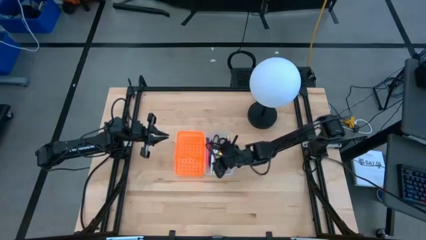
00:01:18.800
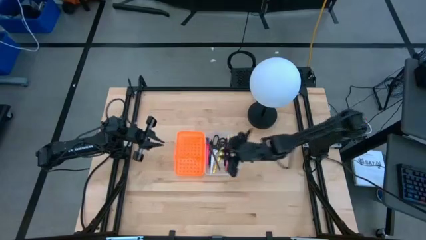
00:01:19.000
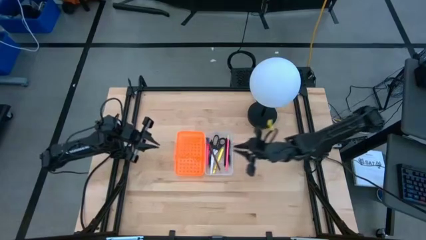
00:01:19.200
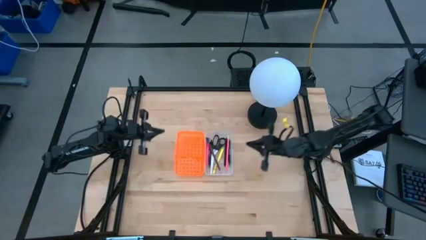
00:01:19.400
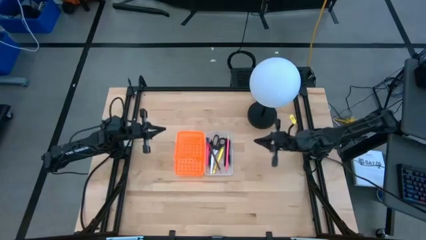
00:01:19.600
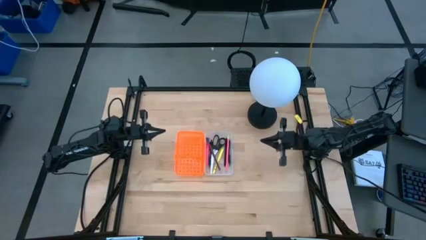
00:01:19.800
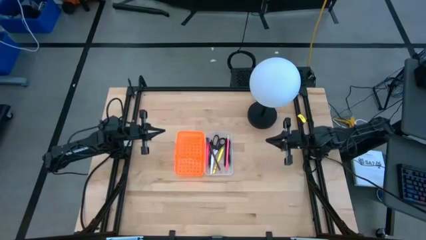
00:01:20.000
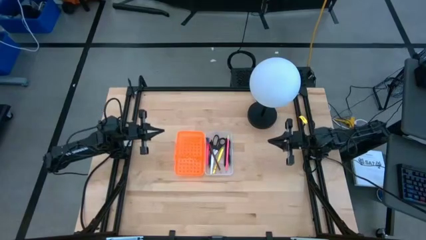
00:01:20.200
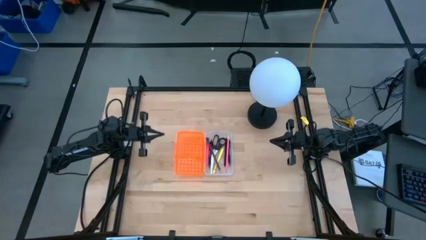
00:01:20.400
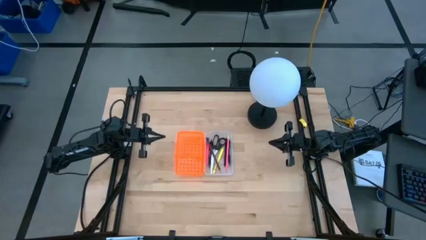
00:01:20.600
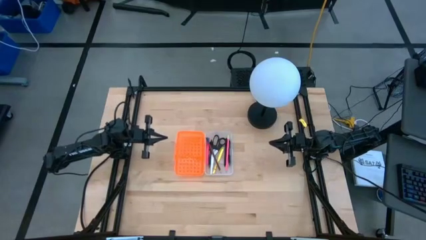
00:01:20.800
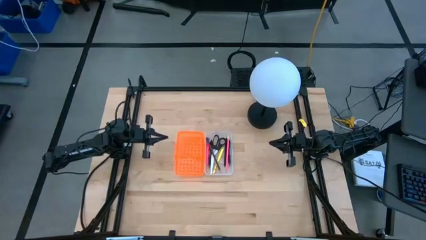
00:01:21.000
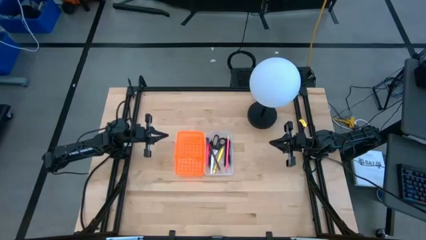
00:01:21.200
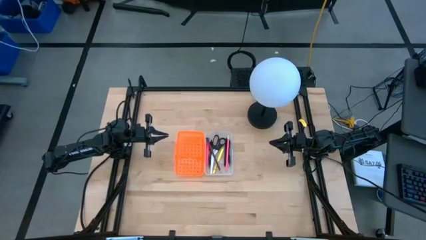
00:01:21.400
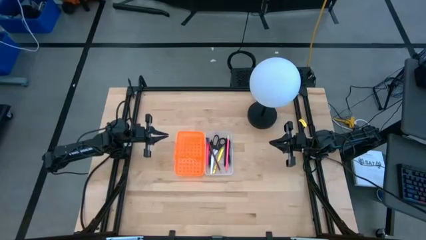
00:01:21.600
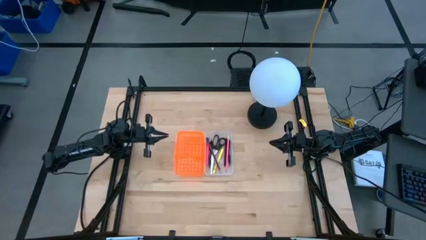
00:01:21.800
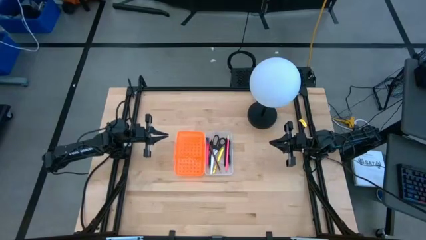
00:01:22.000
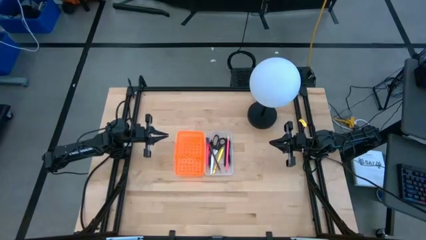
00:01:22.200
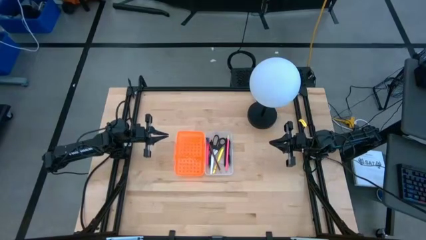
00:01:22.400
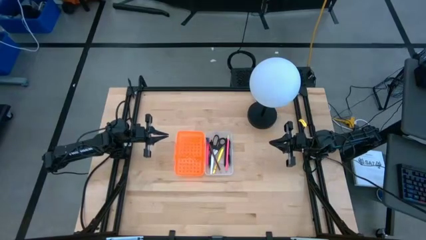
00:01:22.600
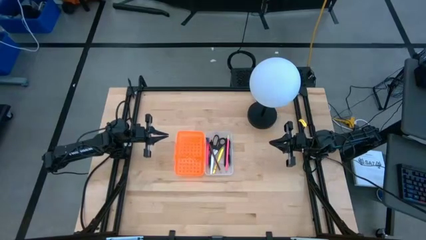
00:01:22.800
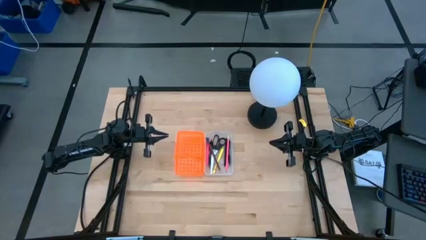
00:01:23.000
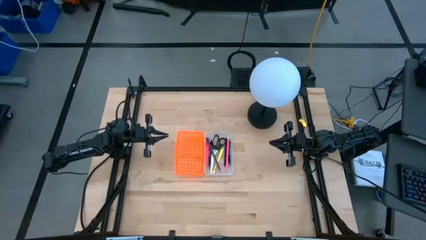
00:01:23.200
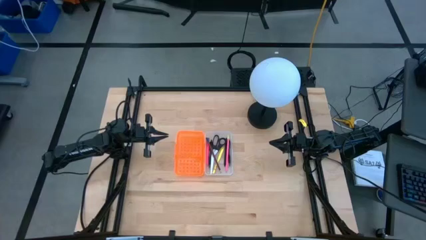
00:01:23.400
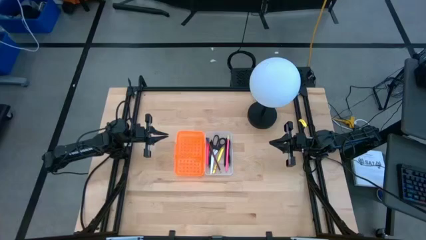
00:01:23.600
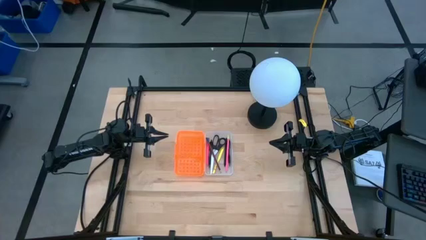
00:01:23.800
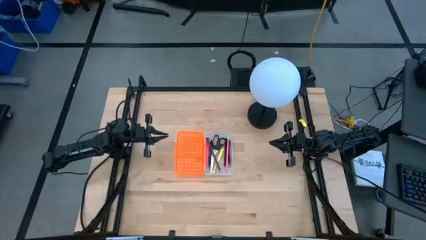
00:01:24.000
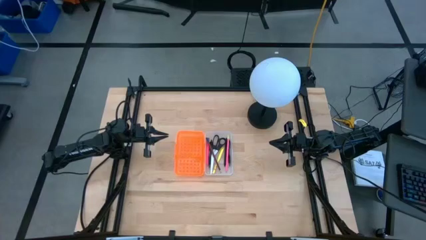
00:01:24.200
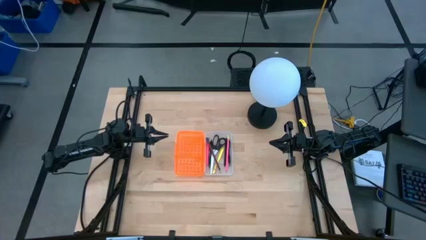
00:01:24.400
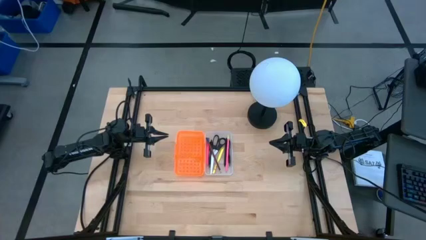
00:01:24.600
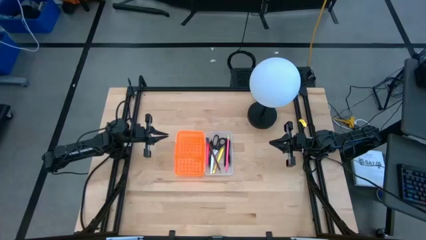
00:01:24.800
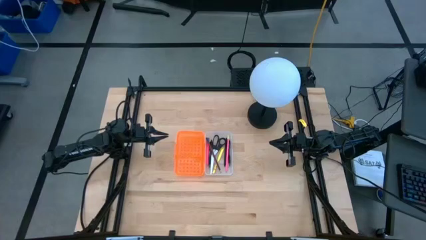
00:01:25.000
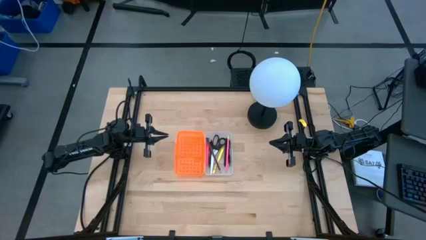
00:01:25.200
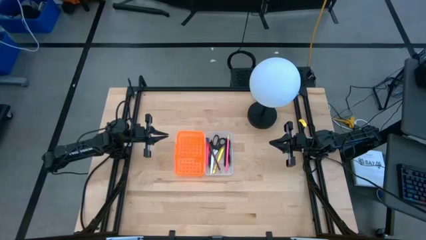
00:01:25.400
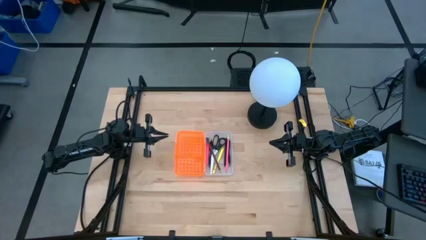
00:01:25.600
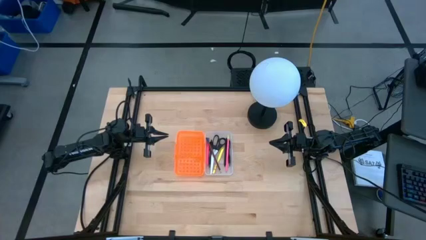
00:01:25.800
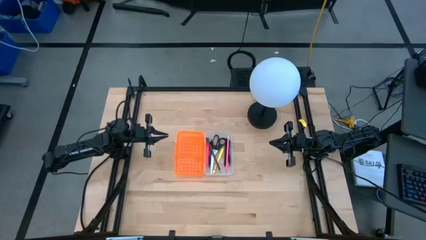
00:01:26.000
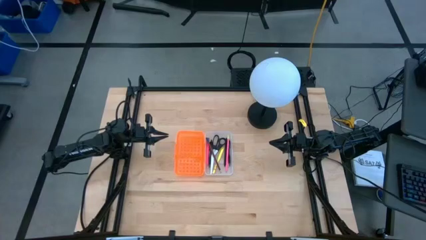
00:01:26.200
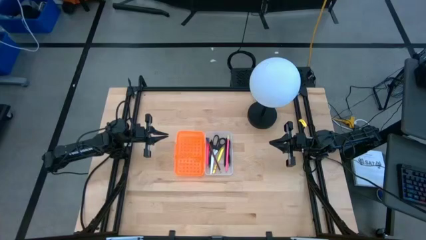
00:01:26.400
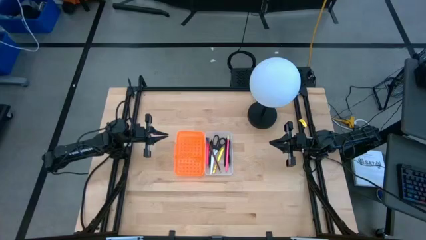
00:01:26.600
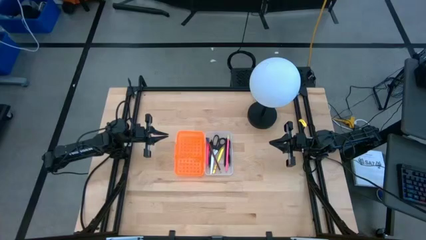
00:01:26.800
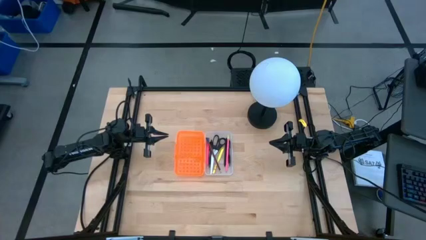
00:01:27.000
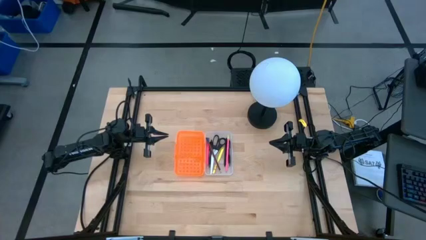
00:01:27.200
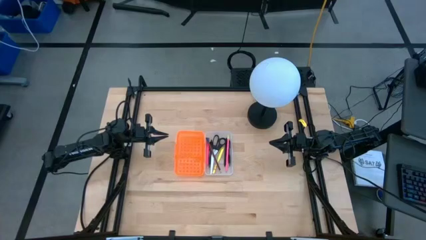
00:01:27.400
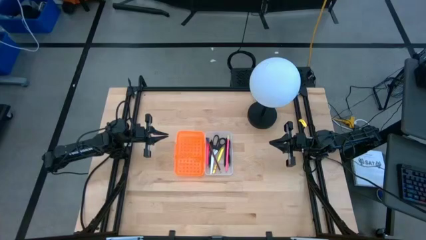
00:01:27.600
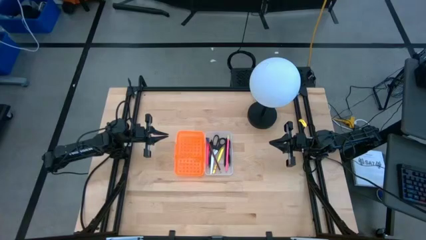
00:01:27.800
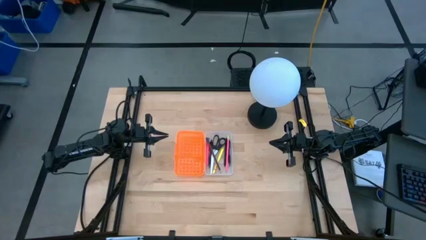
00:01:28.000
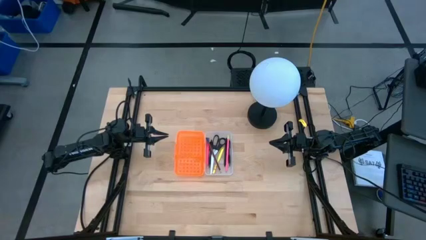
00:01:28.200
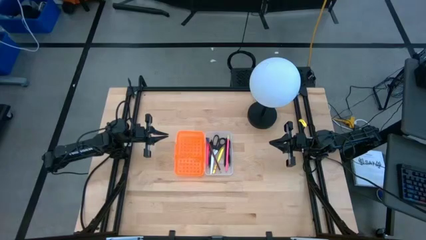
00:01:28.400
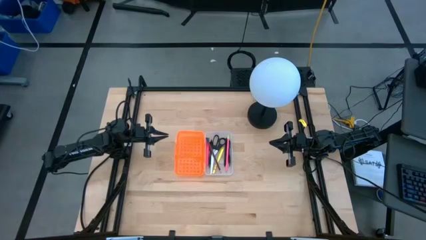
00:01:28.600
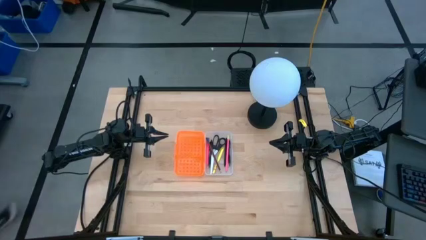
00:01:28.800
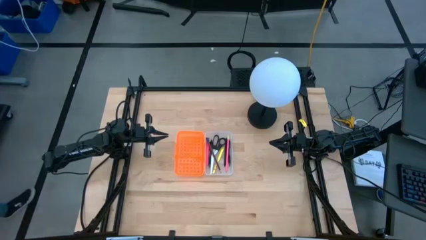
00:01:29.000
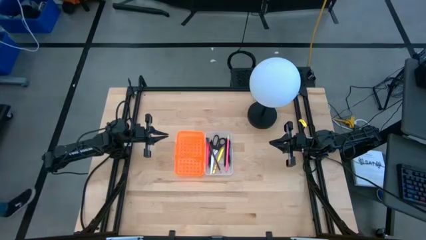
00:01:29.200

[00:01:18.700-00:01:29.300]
Task: Pick & place school supplies into a supply box
Return to Home Position
